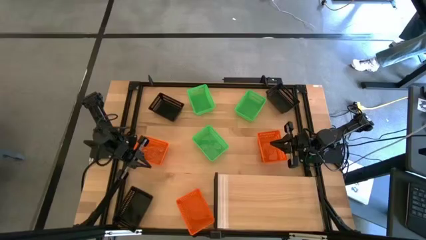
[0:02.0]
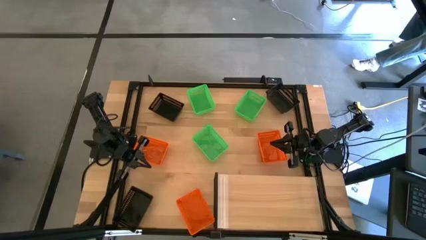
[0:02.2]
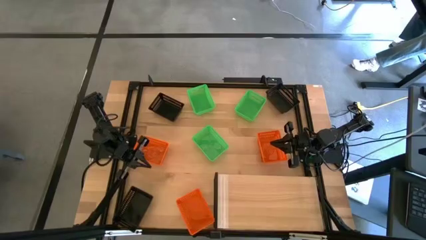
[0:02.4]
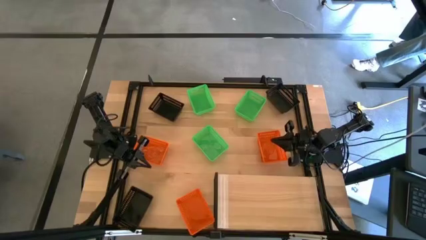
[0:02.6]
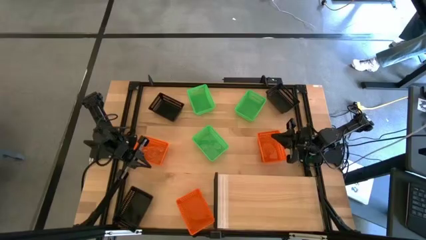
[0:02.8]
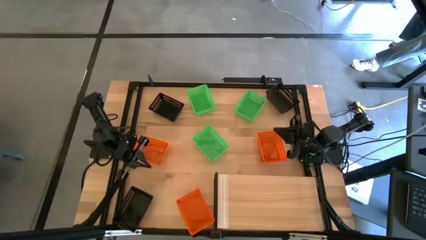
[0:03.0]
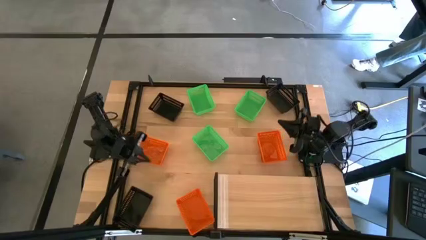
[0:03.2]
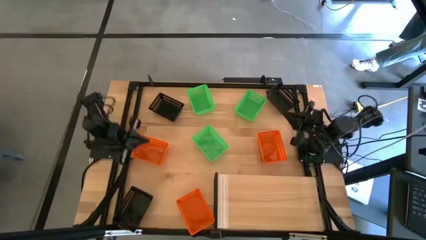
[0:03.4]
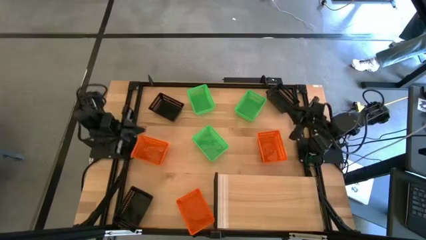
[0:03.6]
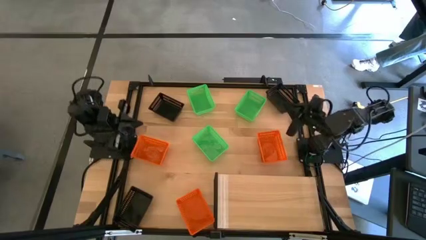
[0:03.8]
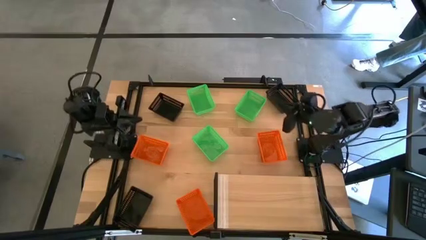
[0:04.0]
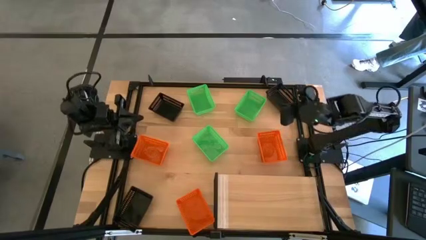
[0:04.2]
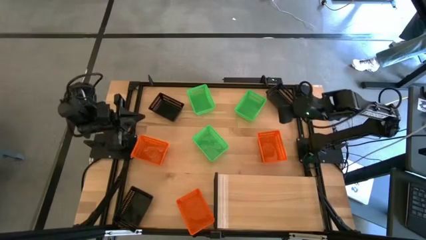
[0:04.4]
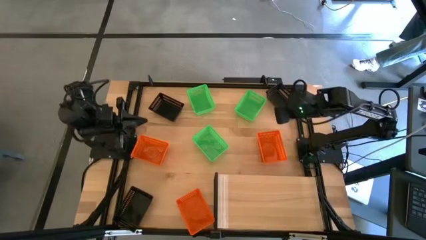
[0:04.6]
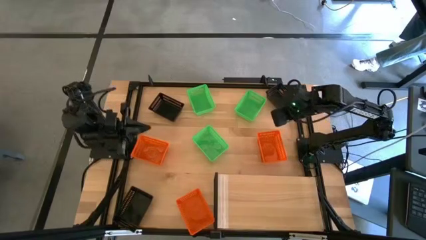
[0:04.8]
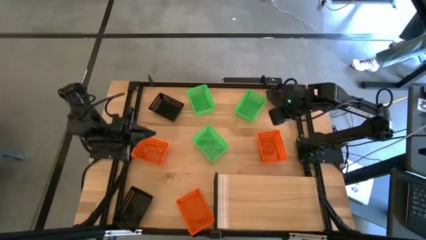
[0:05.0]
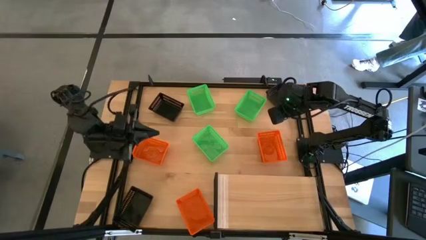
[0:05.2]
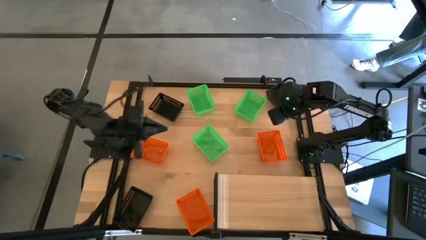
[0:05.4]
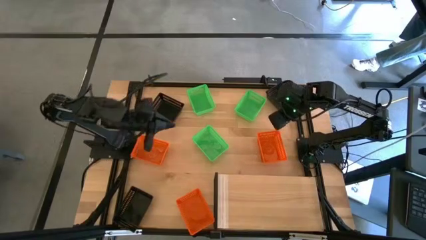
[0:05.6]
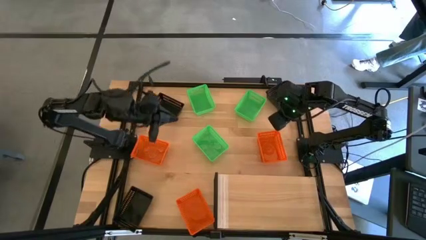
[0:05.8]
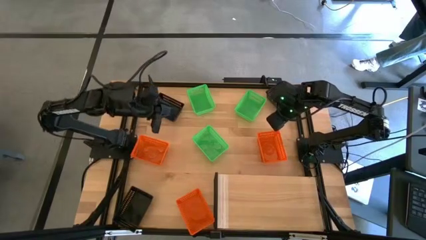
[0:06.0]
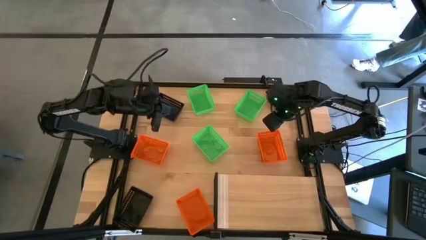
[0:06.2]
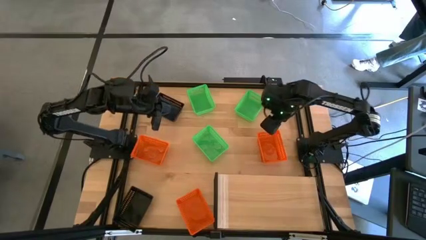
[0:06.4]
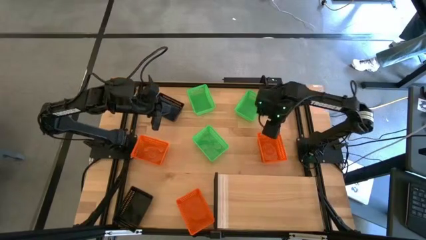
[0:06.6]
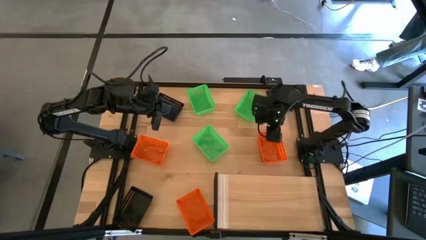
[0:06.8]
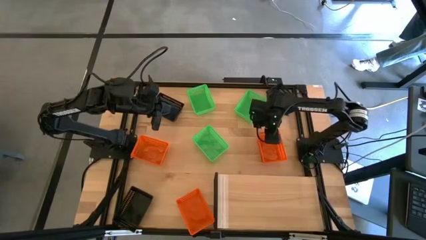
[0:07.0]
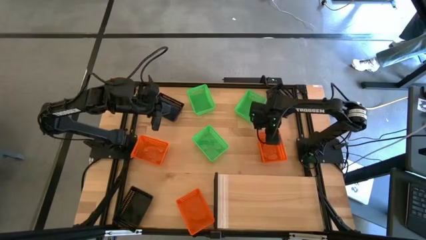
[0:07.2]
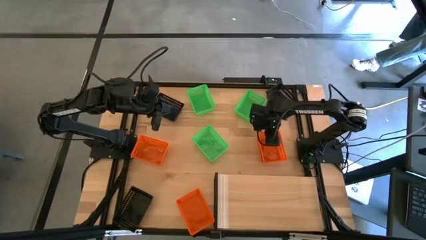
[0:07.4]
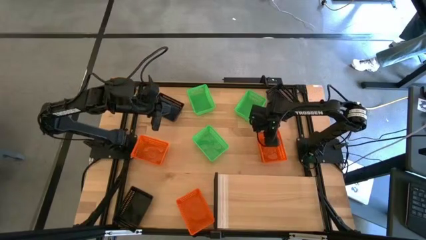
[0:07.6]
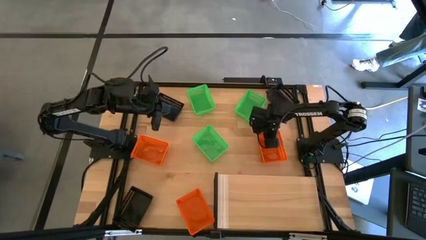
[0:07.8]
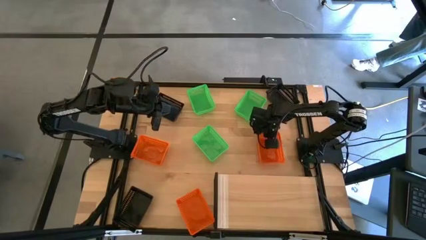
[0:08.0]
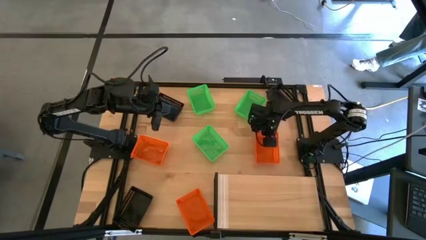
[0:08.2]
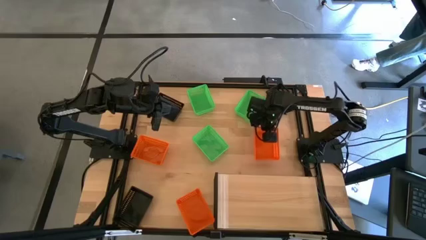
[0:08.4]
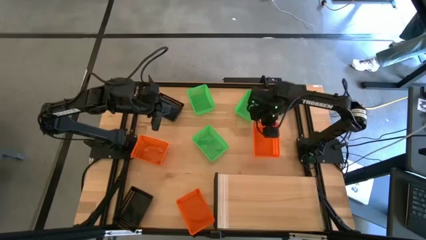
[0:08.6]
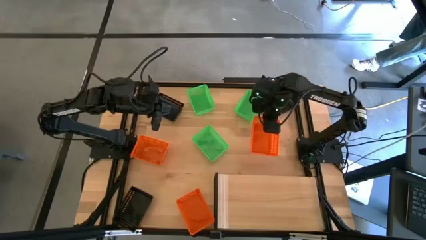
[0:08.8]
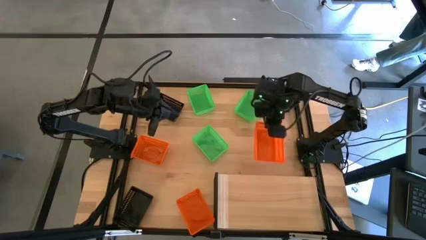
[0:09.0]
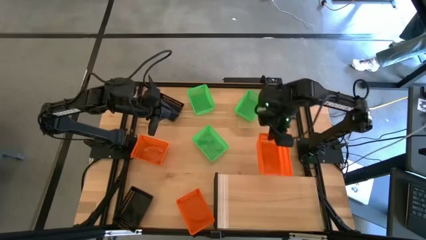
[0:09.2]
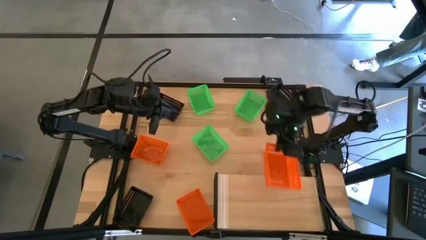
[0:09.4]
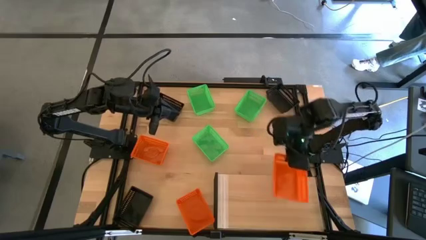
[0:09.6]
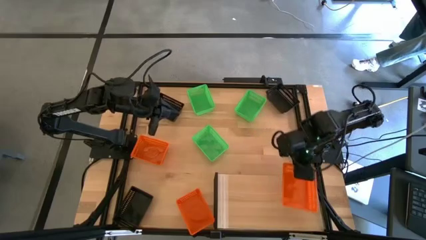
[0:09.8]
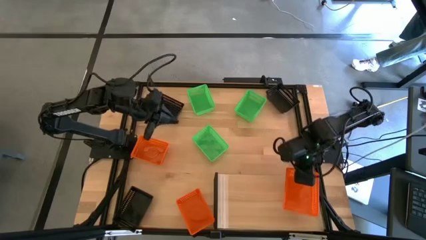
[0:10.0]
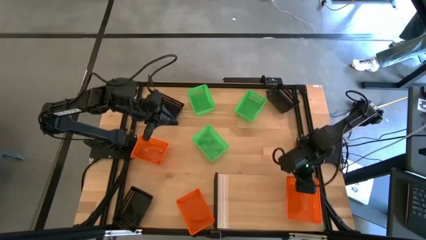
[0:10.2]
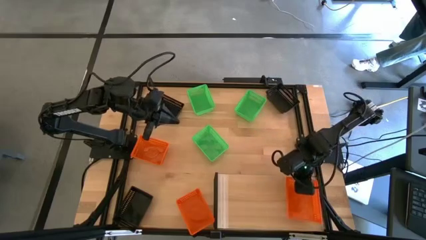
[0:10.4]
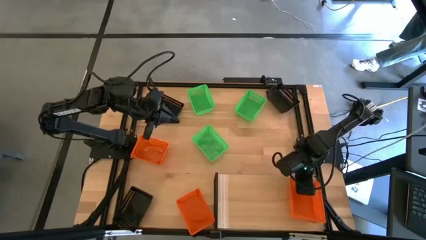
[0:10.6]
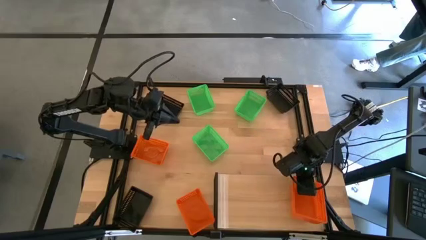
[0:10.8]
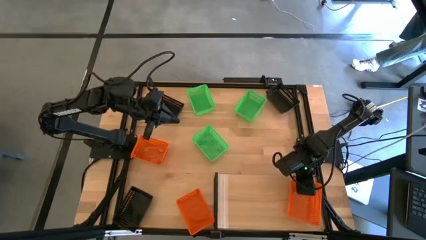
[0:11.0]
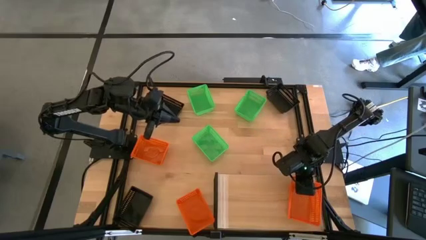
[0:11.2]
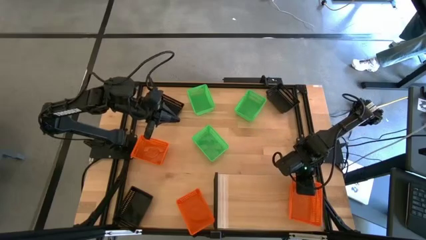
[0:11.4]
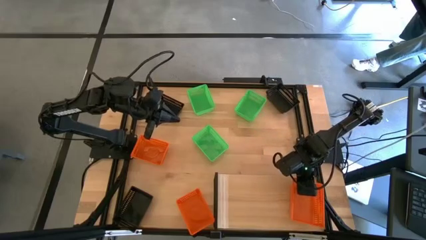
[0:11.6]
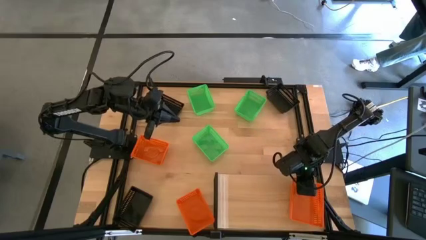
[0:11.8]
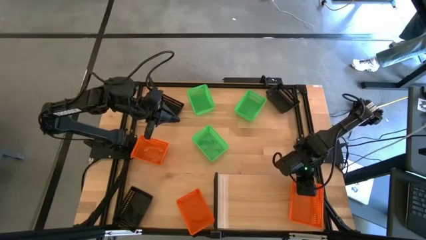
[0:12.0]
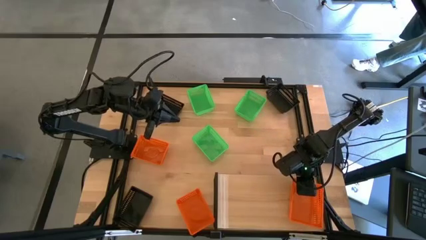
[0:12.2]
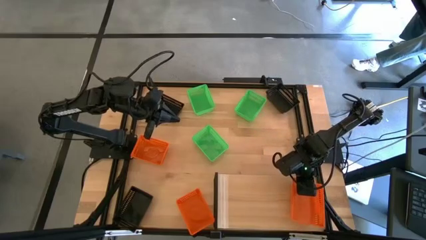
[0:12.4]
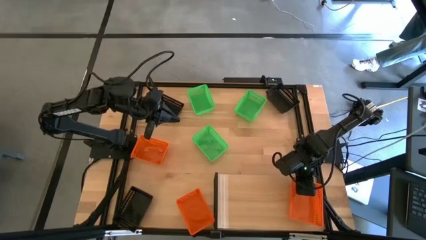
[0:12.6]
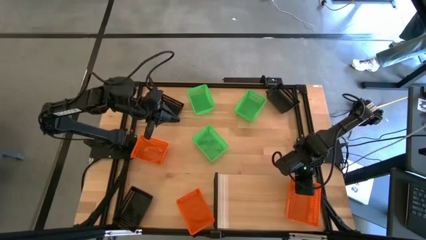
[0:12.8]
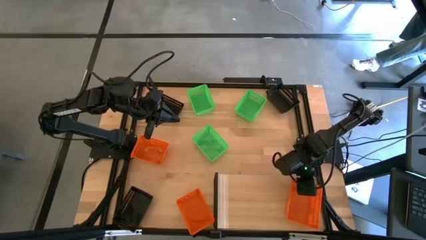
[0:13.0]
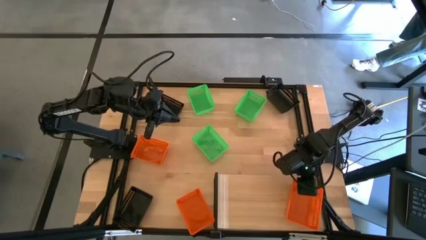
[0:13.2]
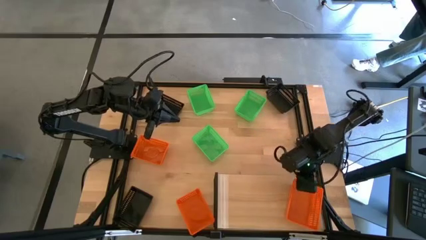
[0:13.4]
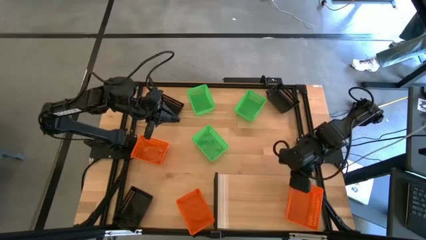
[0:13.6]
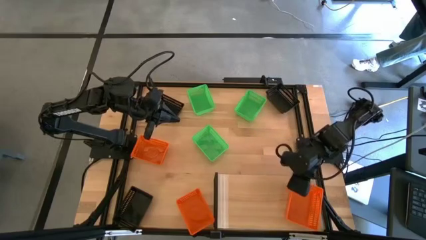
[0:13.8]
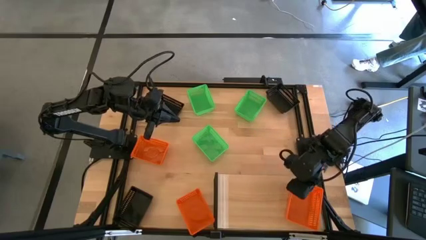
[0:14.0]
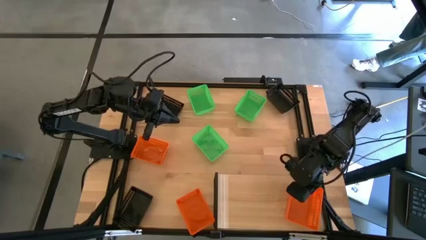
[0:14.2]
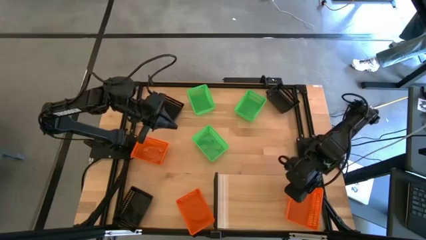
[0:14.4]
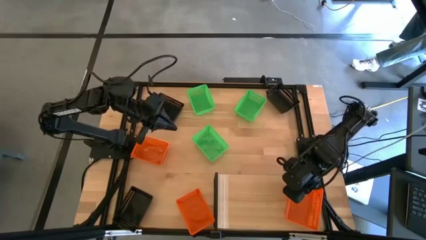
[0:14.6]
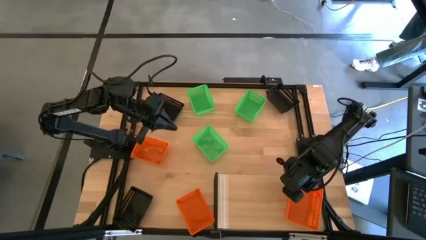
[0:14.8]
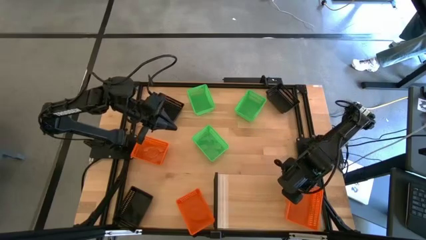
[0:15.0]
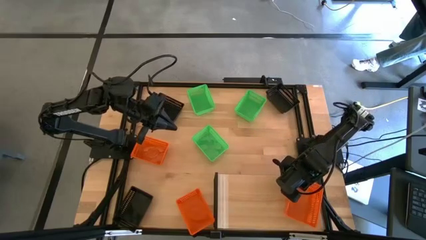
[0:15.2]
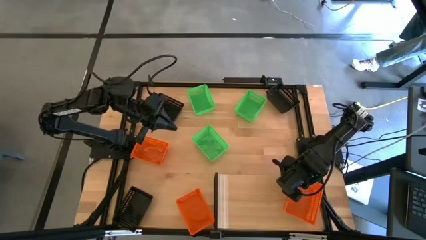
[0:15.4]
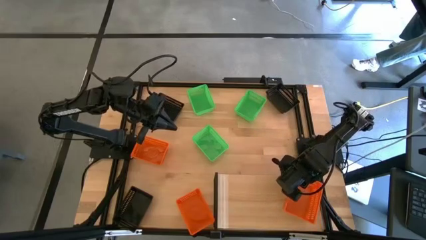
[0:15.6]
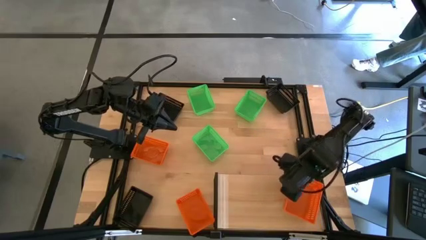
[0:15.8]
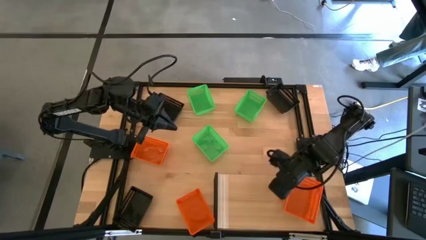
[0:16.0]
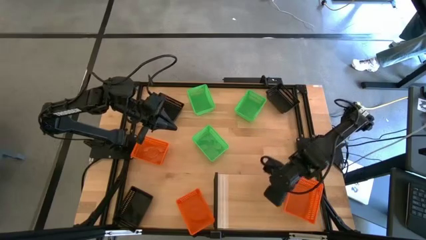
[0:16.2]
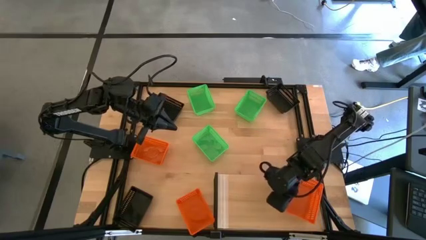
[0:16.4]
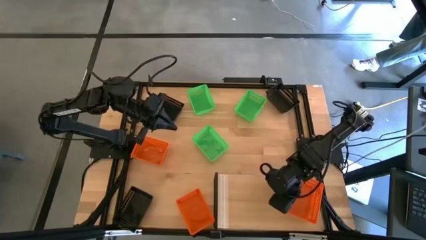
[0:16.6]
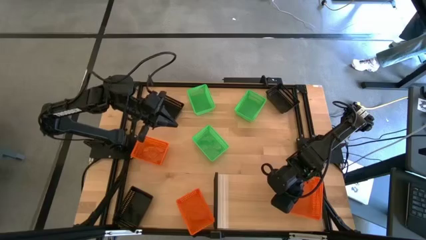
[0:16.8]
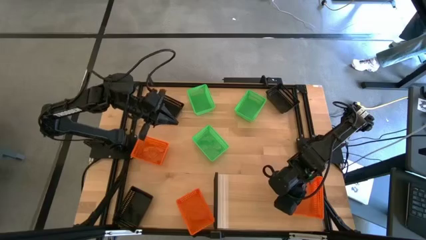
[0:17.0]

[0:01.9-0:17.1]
Task: Stack baskets on shelf by color
Put the top right orange bin on the shelf
